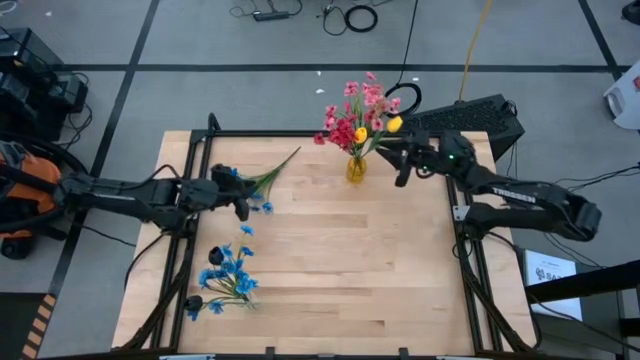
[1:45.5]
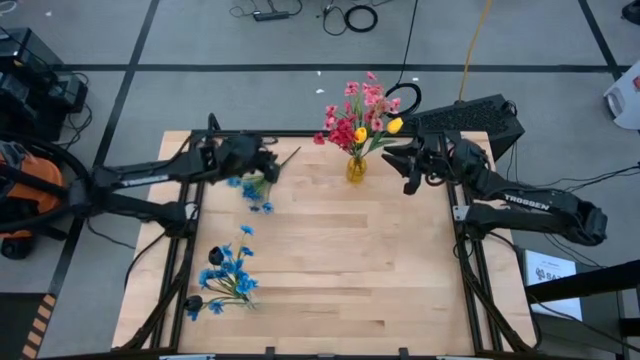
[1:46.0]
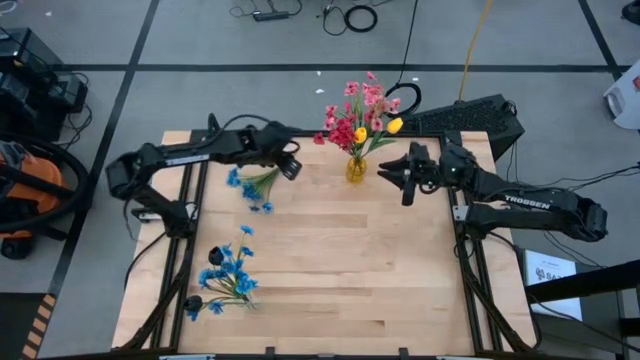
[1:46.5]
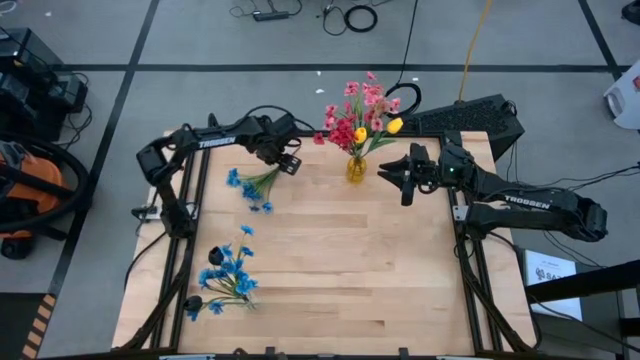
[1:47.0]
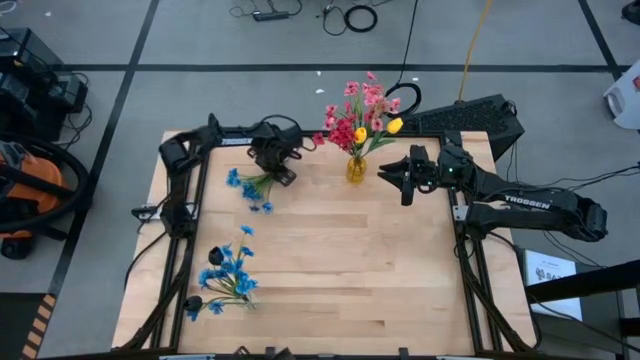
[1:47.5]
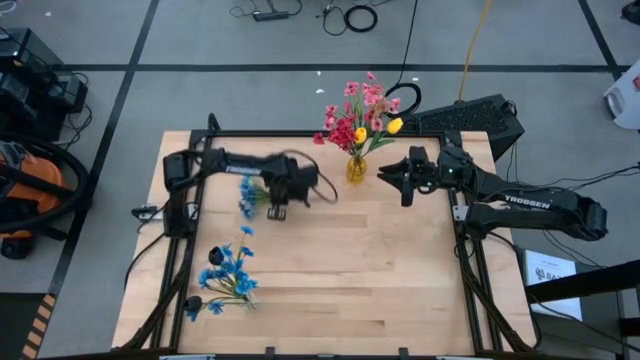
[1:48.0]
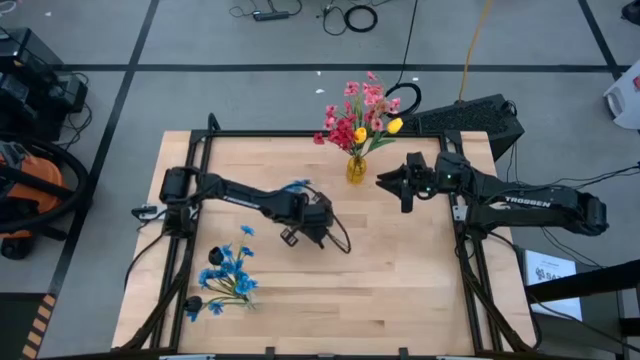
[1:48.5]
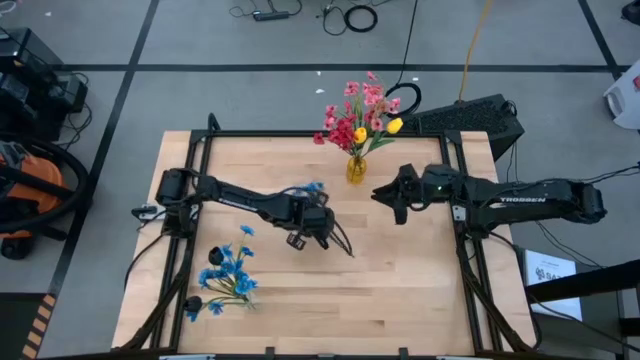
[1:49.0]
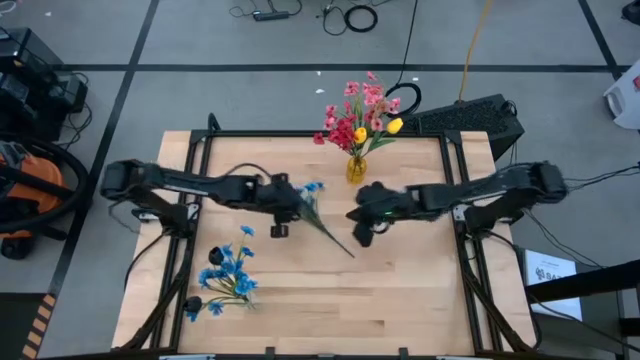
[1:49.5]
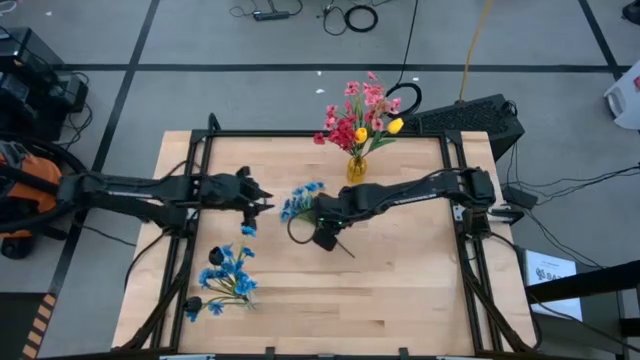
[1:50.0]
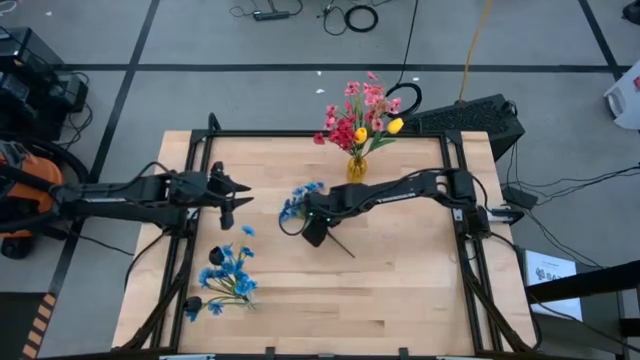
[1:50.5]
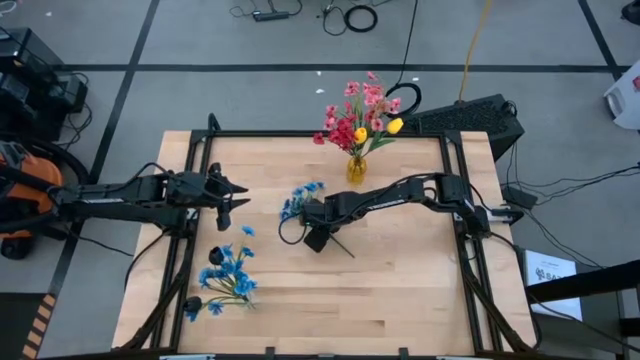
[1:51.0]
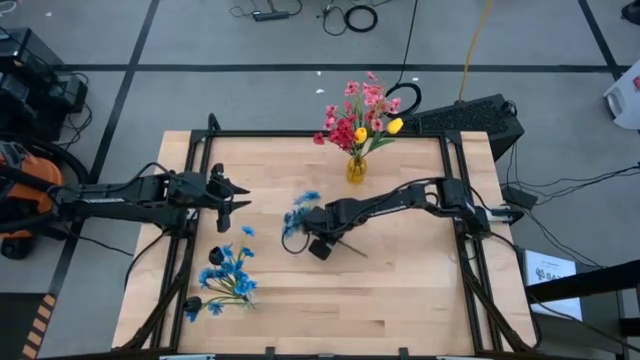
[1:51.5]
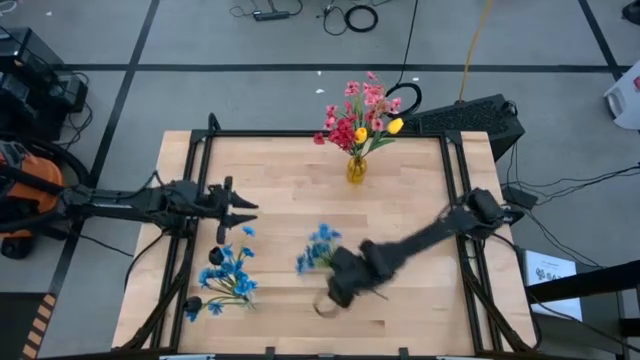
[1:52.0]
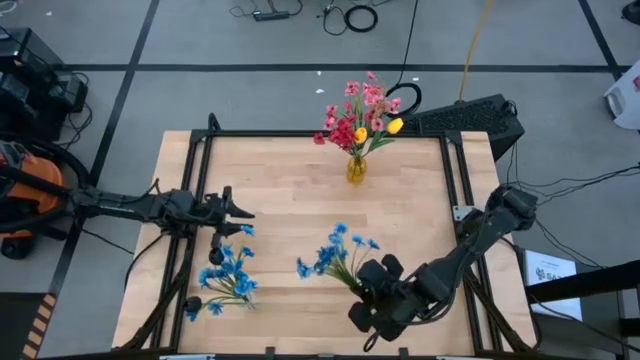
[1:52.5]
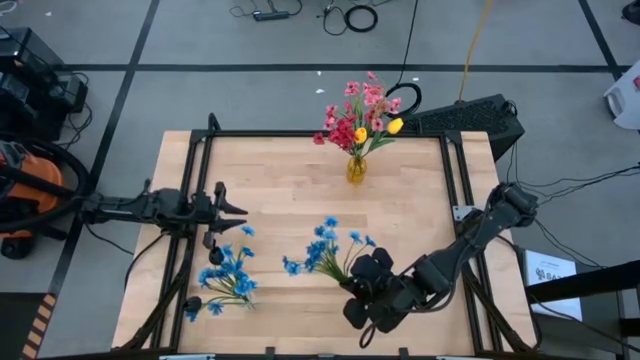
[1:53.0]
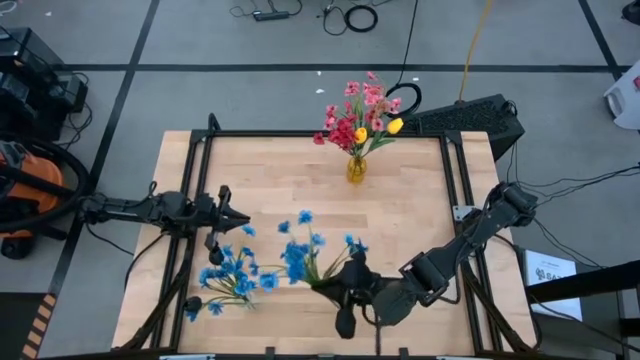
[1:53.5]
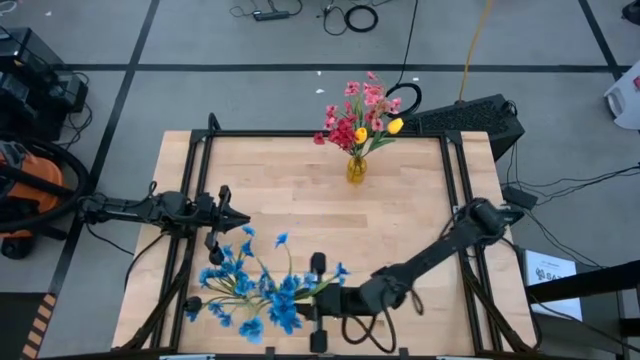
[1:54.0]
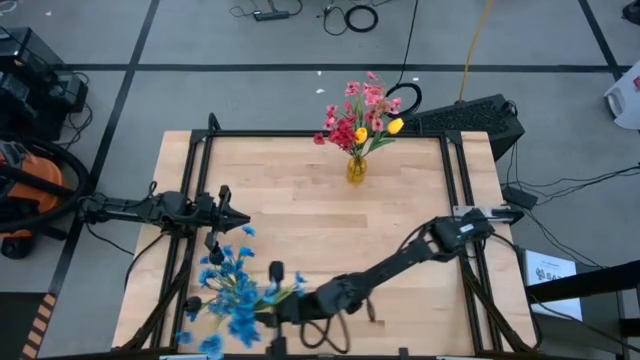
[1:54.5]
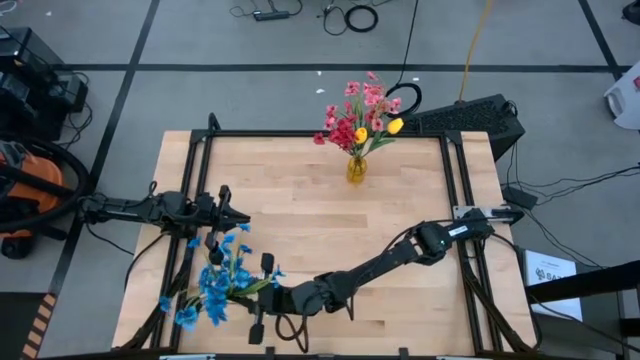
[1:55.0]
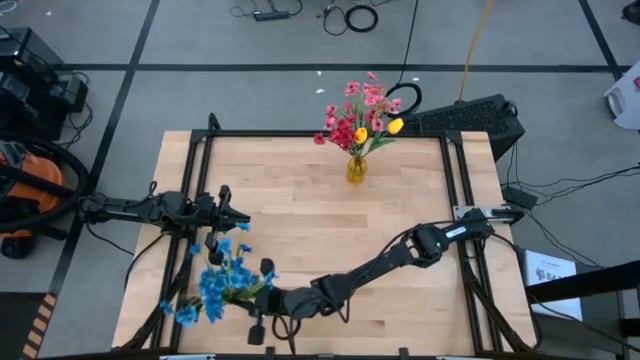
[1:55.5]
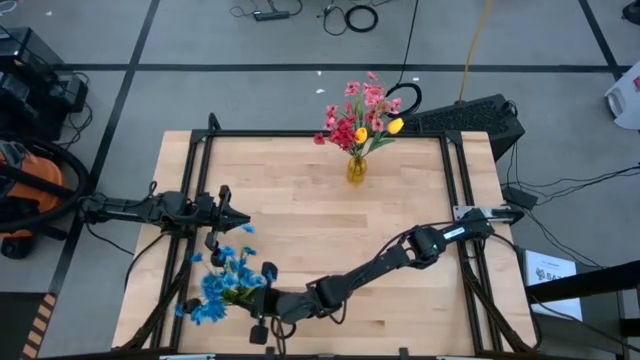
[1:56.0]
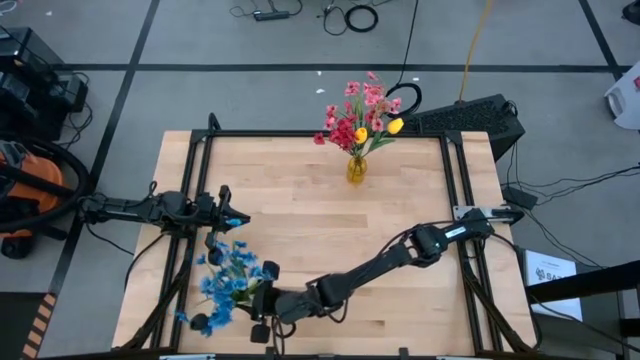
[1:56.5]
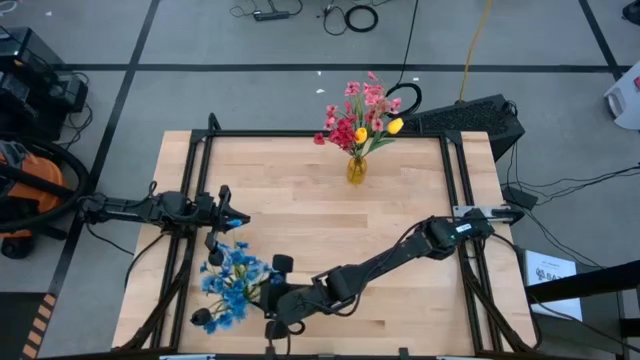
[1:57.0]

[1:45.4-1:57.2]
Task: Sort flowers into vase by color
Put the blue flowers into the transparent vase

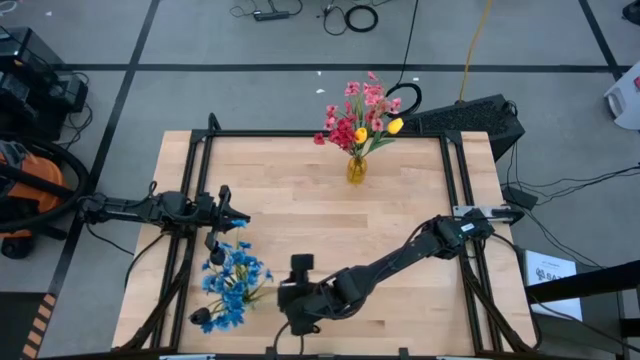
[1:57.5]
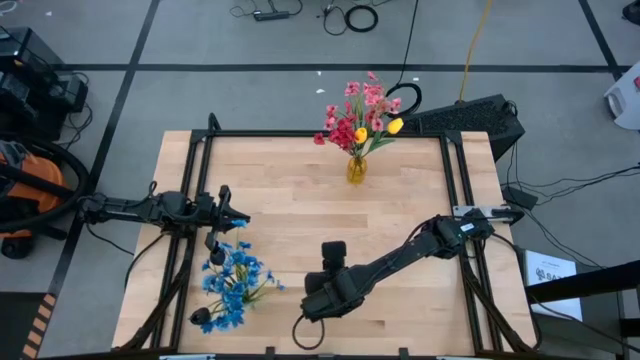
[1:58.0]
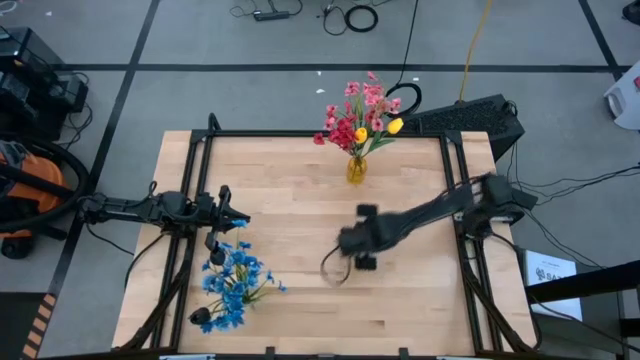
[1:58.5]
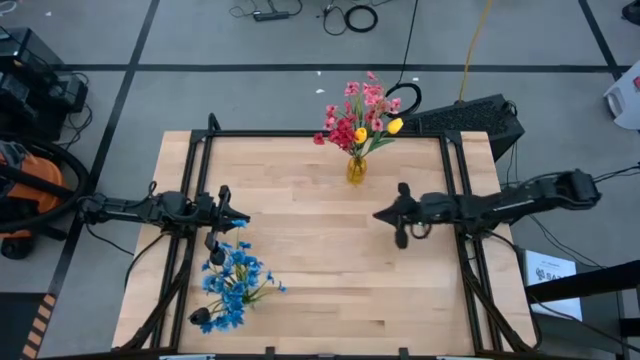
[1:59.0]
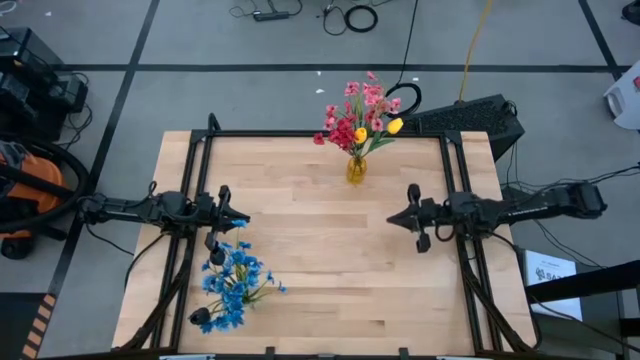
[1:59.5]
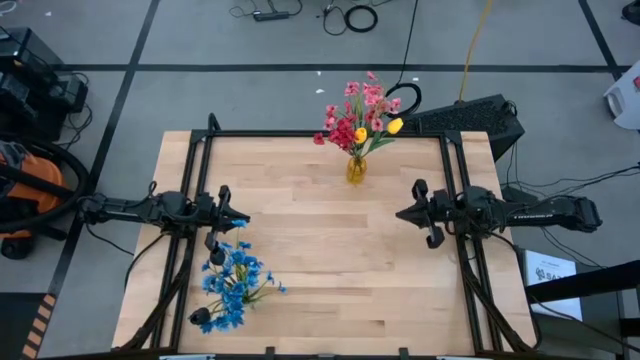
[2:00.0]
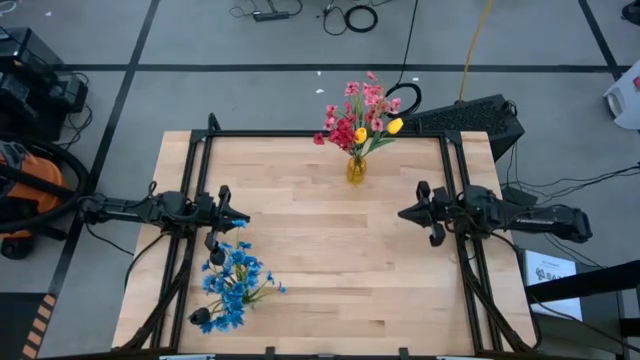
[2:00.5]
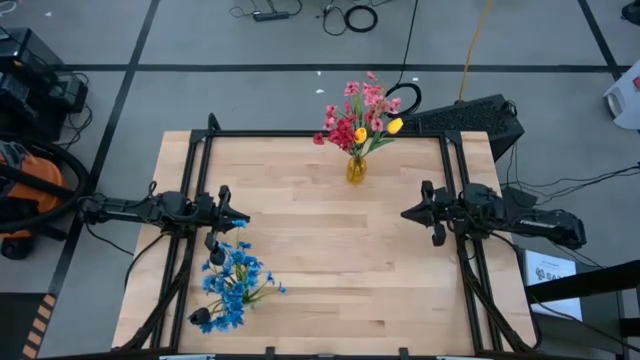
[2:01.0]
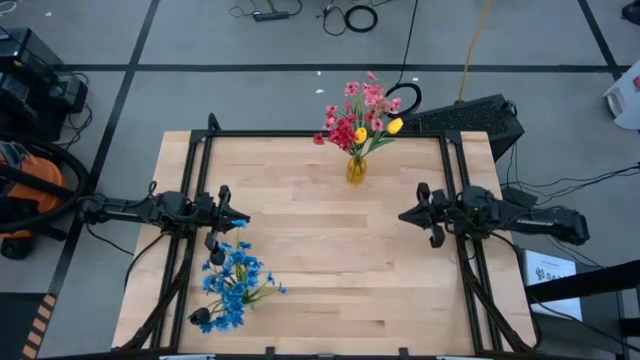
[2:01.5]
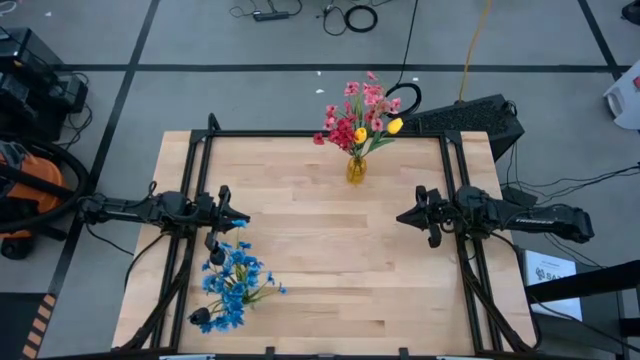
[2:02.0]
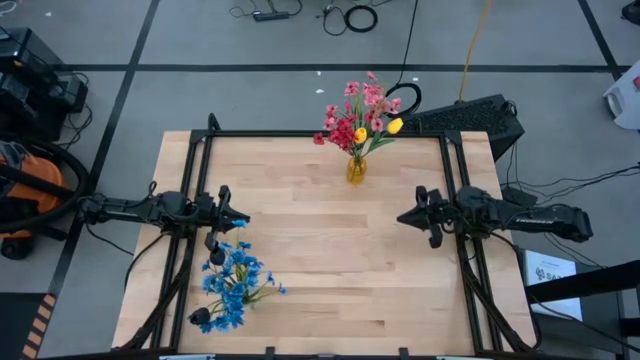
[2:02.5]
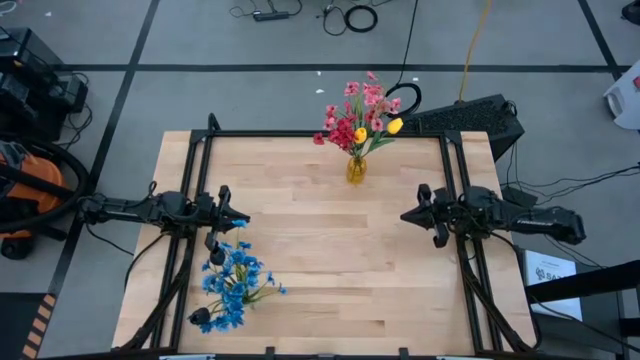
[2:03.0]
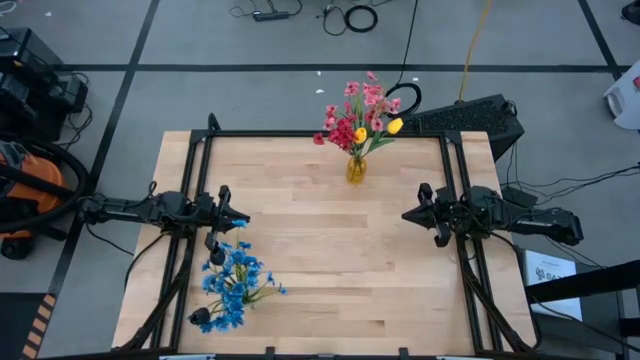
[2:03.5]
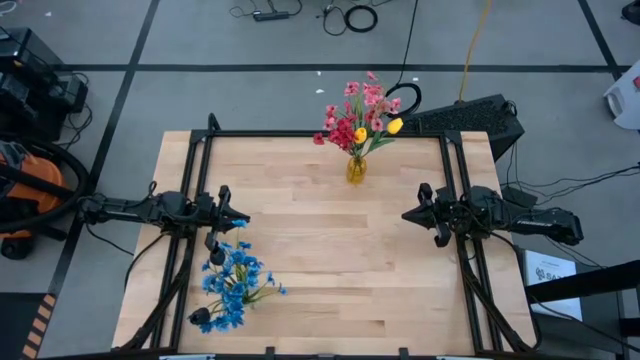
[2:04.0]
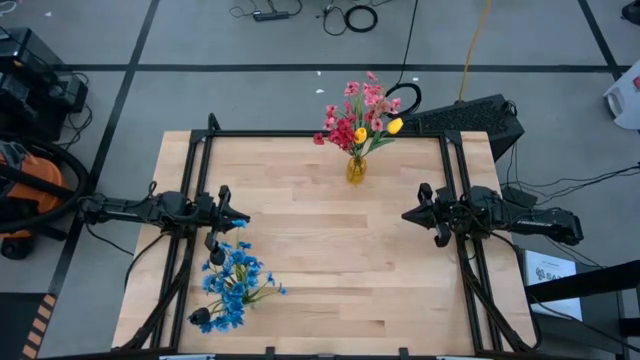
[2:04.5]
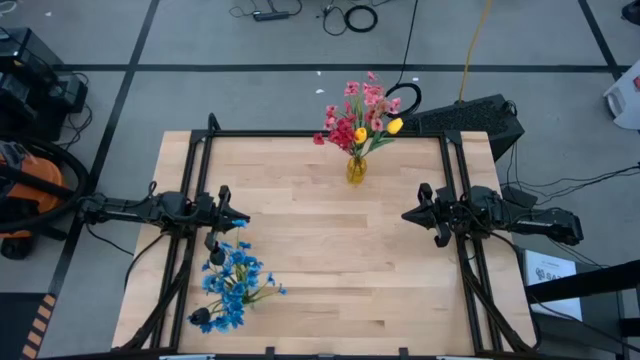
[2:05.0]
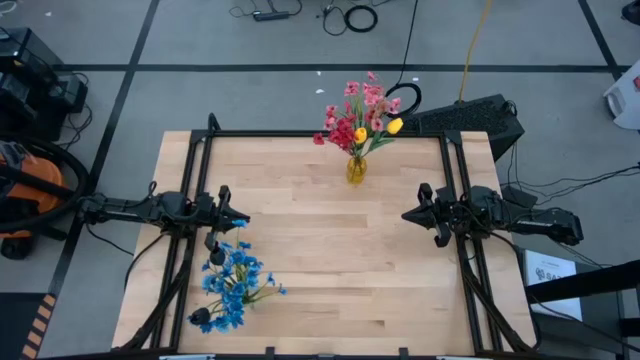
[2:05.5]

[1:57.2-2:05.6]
Return to Home Position
